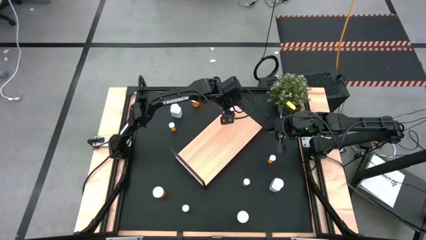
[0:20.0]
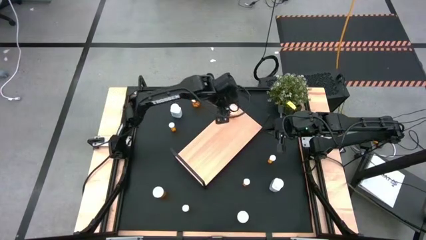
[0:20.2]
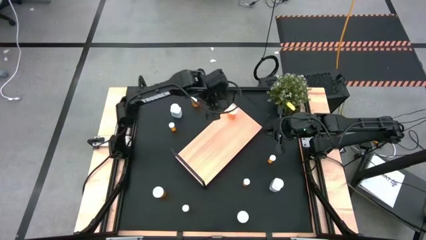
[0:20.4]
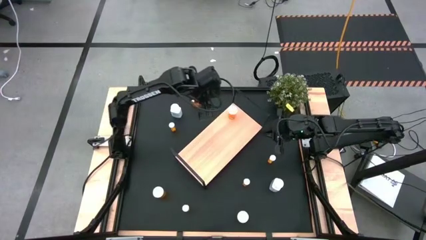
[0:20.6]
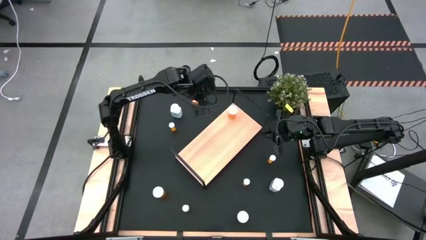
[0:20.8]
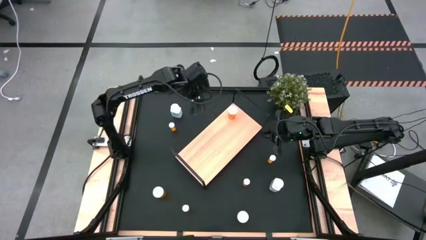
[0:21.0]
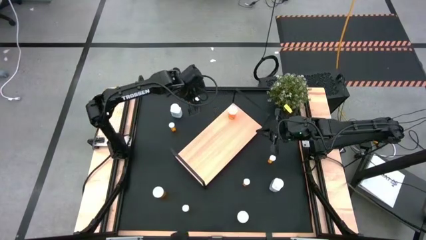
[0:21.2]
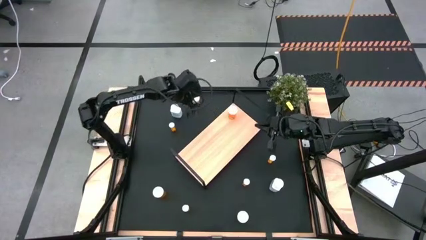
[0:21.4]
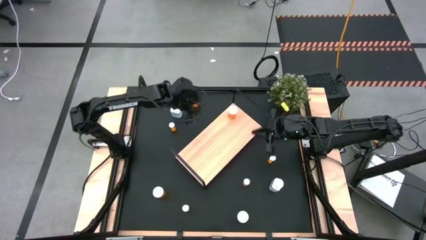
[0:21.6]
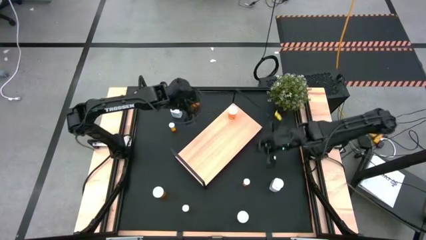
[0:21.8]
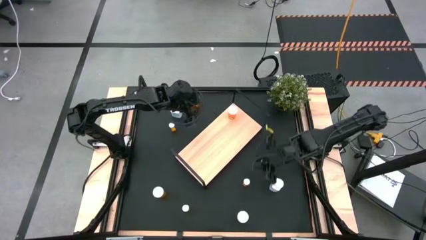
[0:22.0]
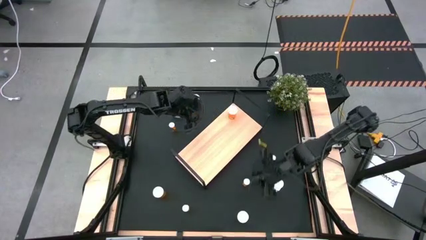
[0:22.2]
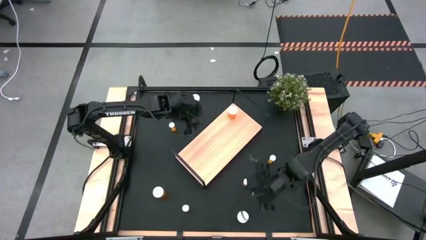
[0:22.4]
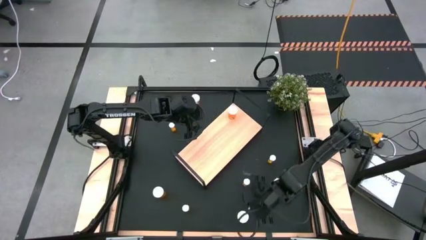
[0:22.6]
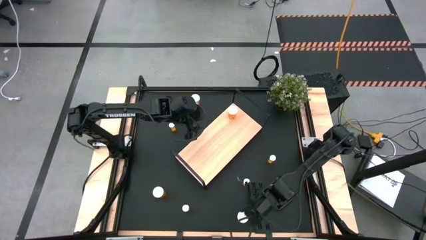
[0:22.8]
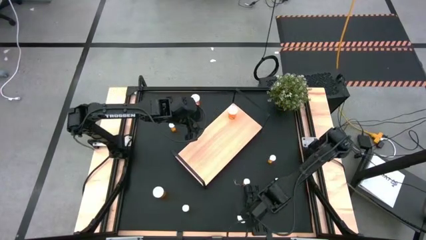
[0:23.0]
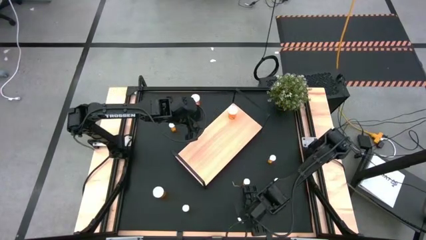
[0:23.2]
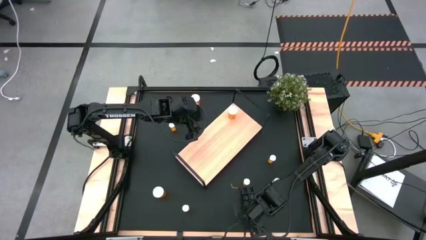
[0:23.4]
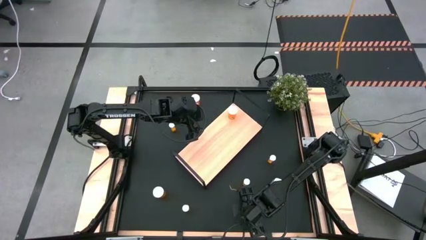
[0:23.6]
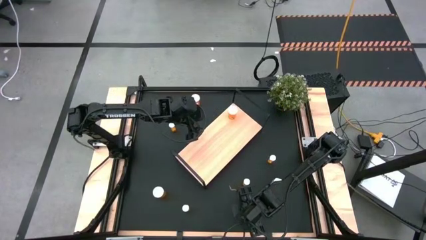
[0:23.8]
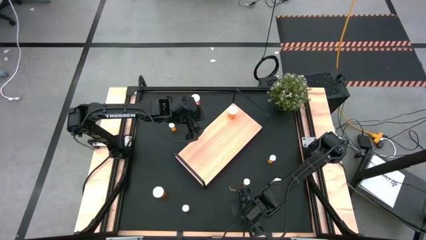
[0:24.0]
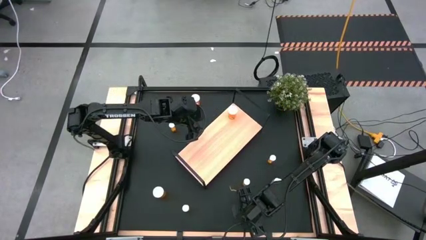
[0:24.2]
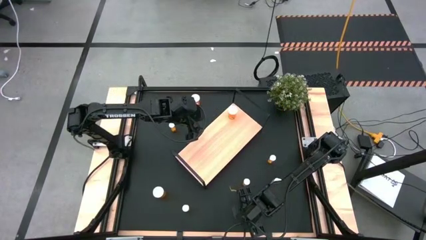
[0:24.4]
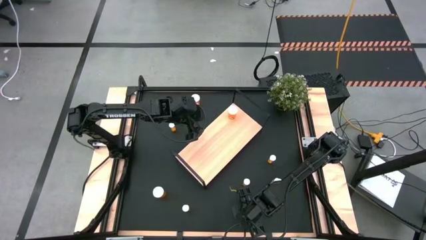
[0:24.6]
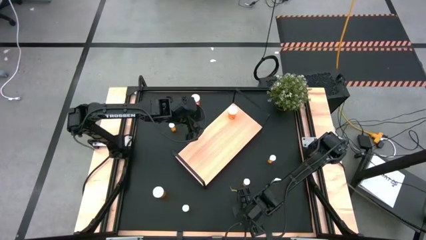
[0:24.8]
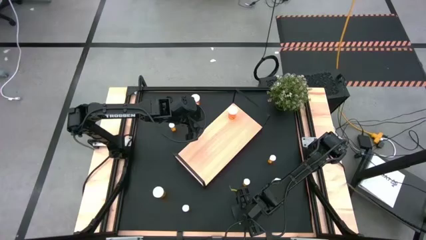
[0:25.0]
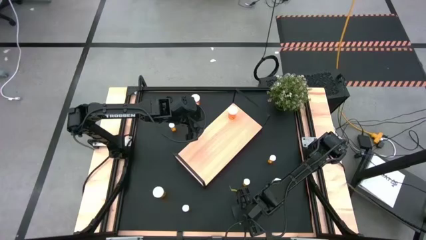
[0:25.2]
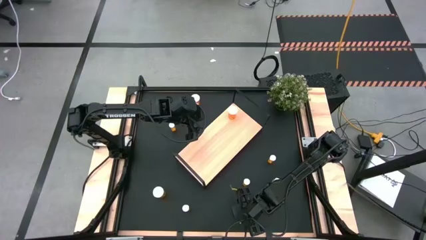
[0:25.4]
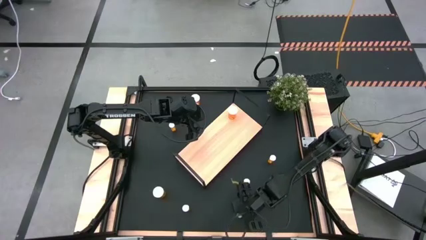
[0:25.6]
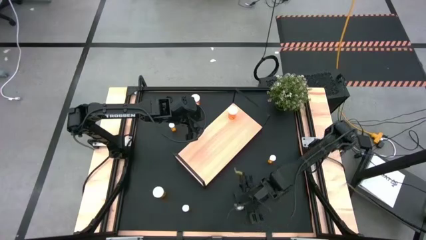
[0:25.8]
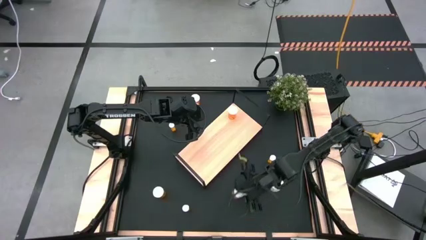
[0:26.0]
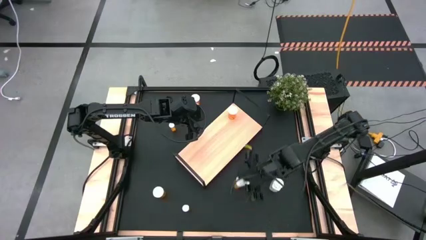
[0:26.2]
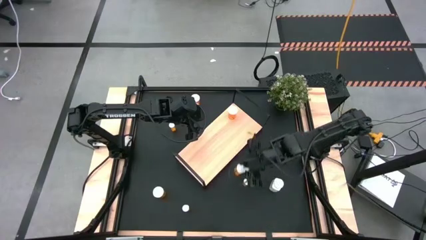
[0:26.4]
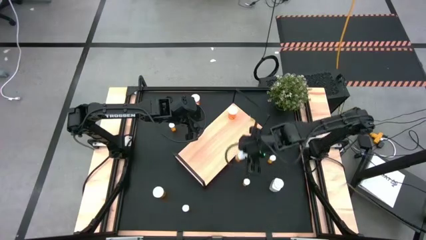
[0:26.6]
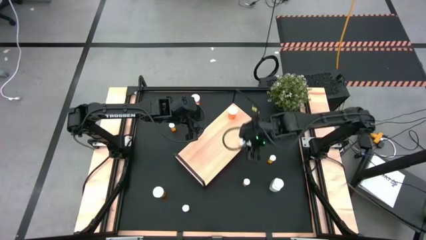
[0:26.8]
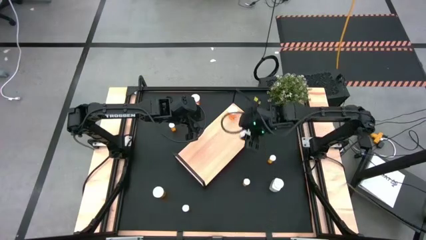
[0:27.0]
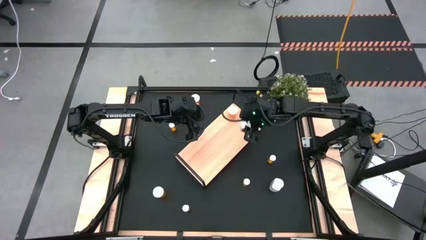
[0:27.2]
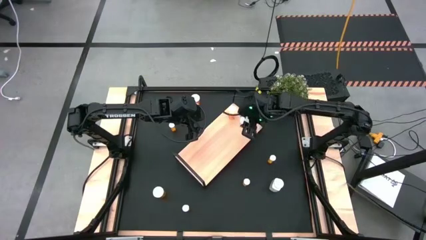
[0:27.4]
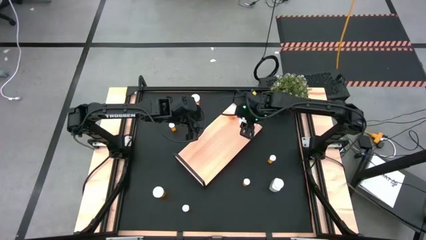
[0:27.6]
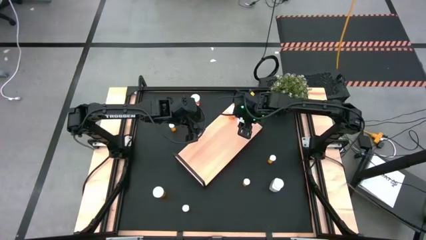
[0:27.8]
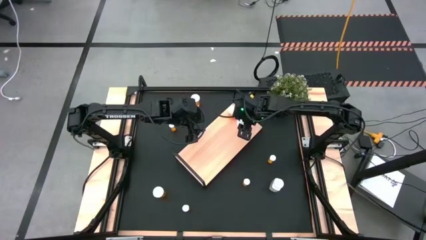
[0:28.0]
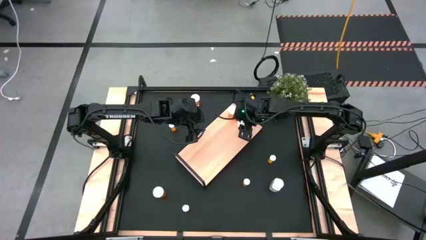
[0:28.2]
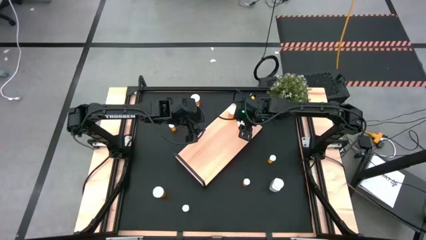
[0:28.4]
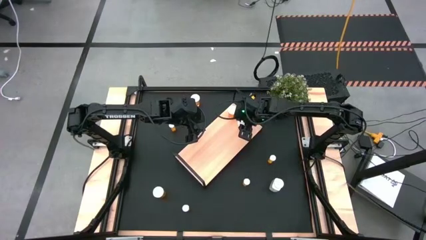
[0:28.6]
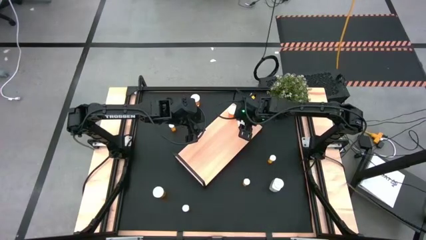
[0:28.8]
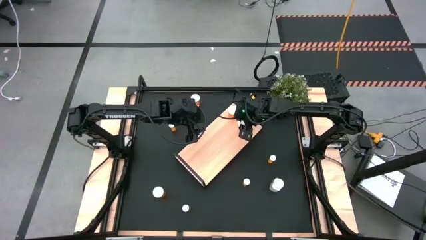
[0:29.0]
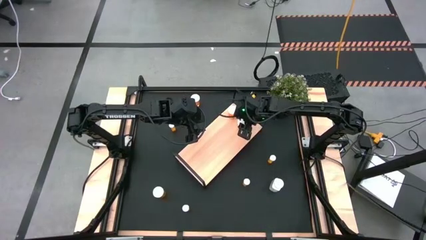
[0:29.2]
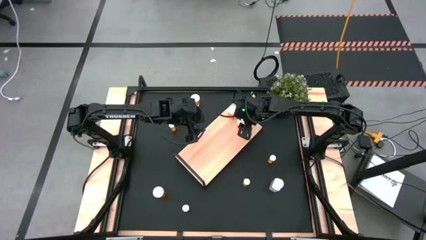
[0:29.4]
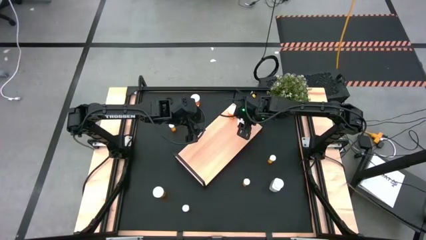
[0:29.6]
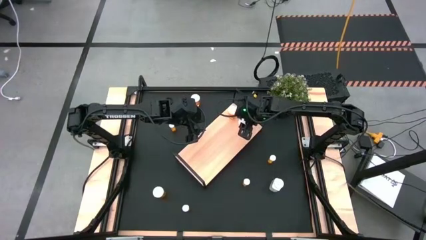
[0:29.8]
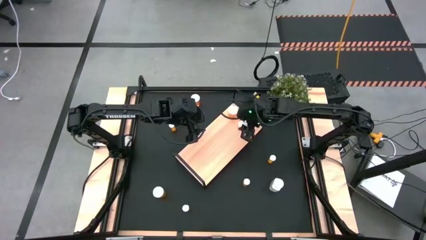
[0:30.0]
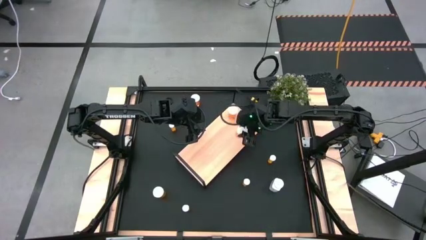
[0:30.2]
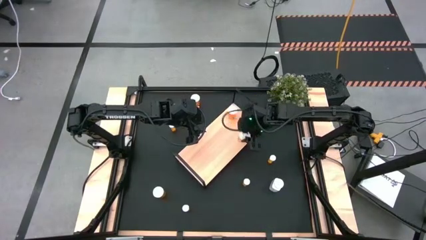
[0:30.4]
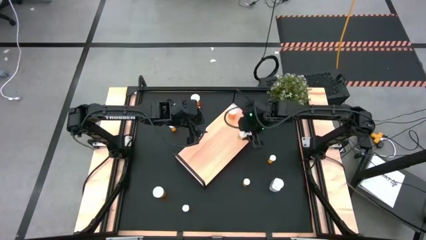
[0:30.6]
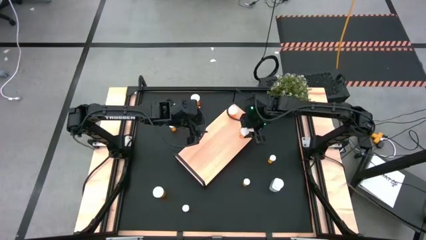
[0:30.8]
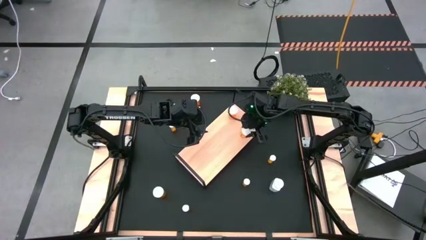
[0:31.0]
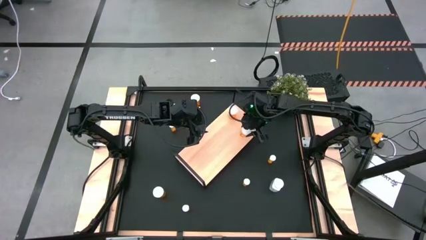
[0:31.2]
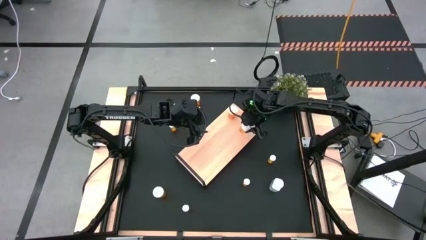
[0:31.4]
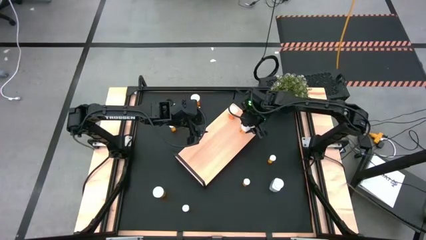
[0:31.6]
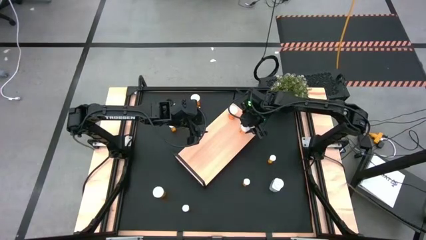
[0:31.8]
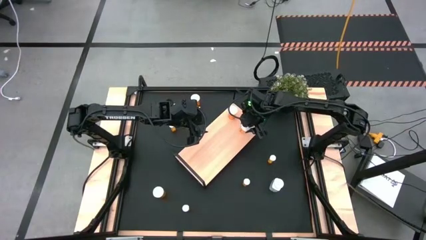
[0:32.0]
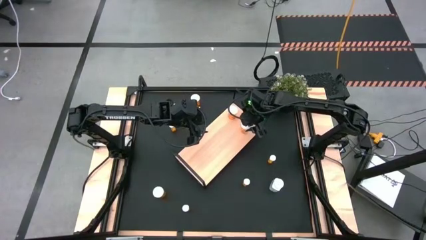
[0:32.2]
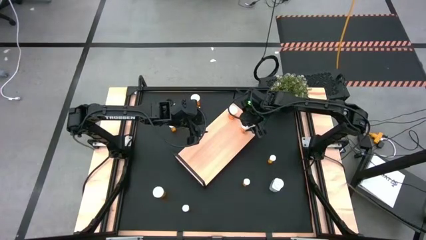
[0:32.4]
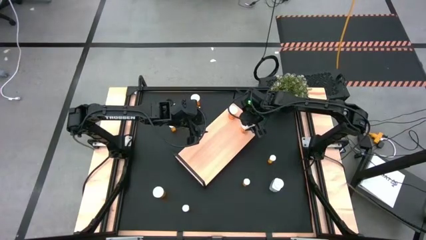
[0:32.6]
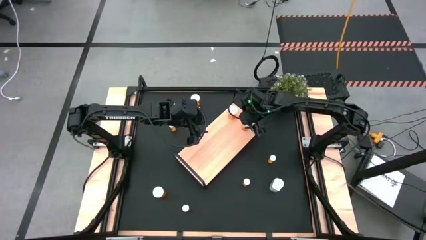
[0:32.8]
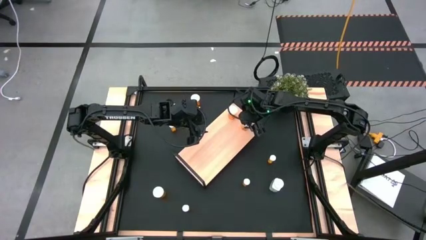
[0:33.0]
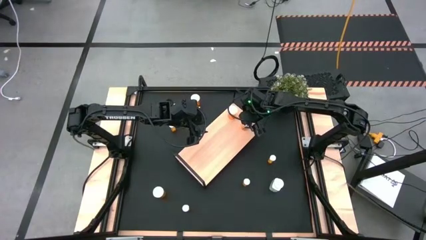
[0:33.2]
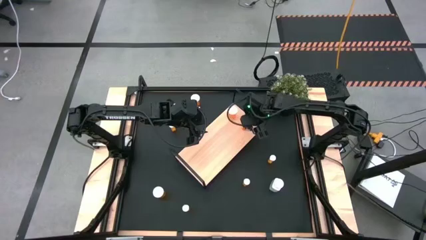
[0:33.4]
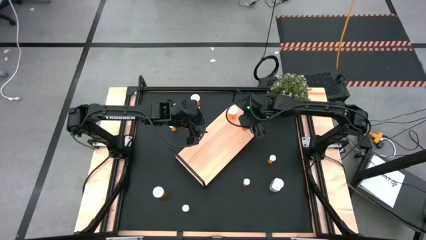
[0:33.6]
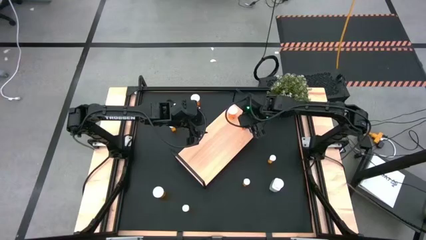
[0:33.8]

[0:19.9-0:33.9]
Task: Pick and place medicine bottles onto shelf by color
Align the large orange pill bottle with the other large pill bottle on the shelf

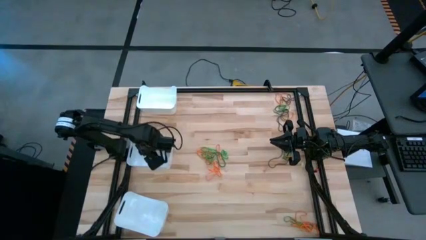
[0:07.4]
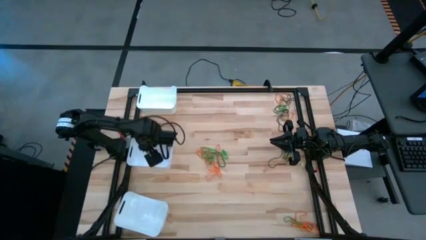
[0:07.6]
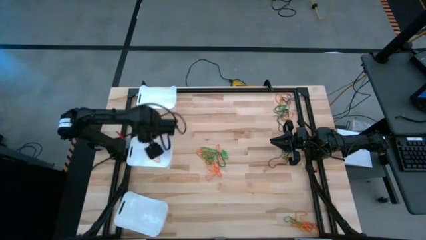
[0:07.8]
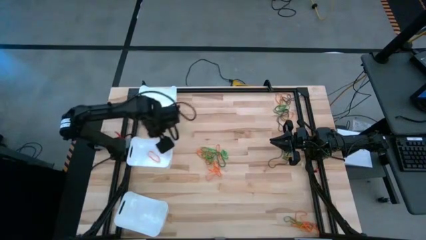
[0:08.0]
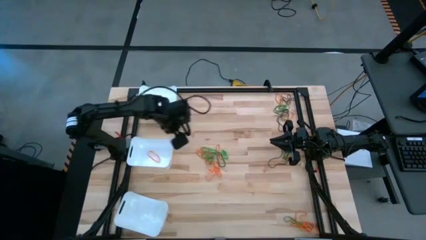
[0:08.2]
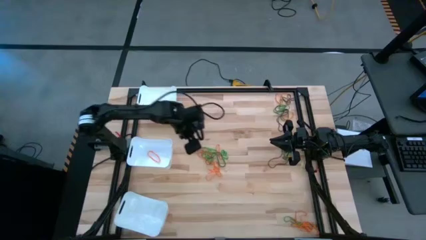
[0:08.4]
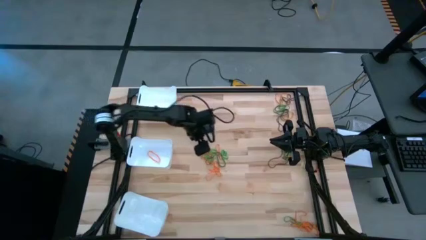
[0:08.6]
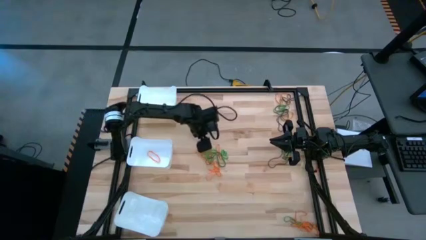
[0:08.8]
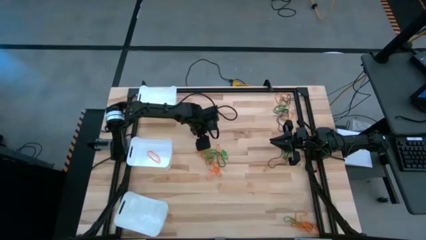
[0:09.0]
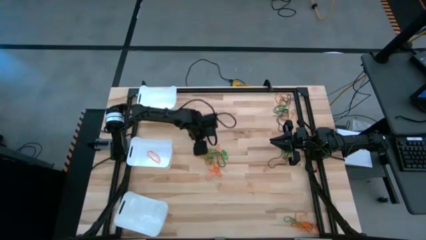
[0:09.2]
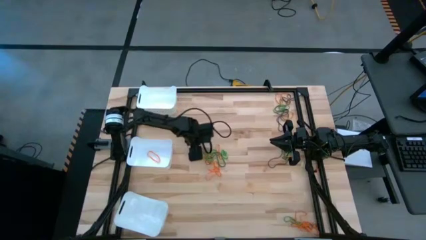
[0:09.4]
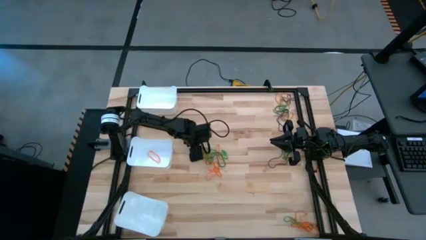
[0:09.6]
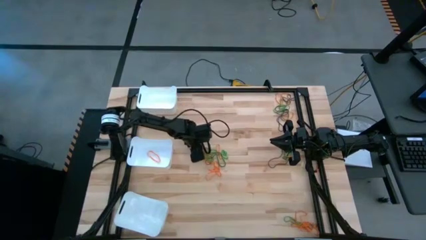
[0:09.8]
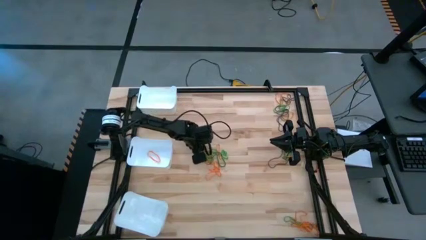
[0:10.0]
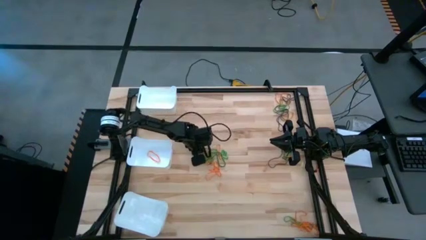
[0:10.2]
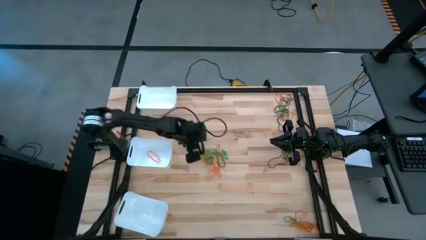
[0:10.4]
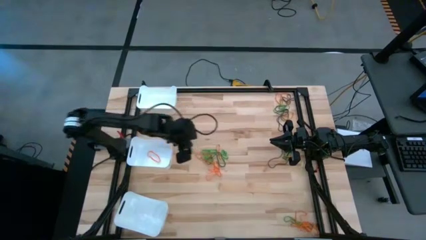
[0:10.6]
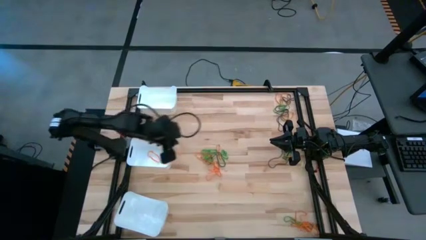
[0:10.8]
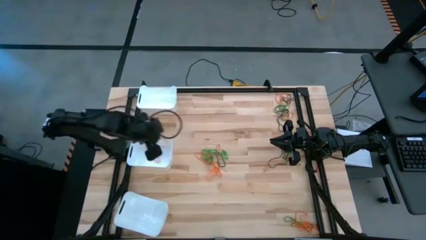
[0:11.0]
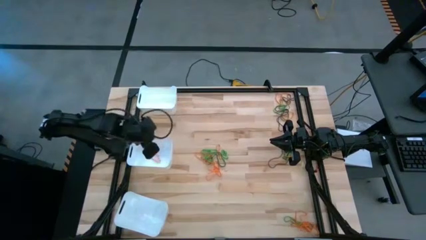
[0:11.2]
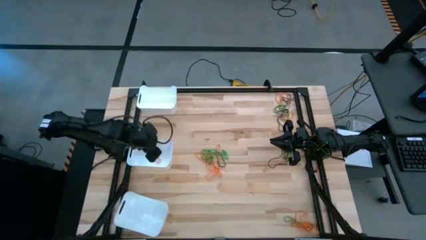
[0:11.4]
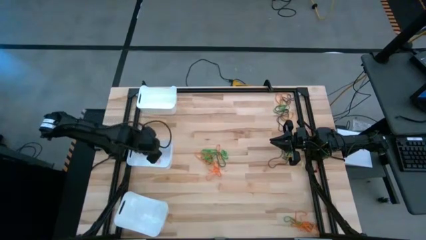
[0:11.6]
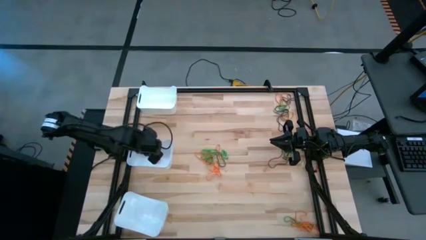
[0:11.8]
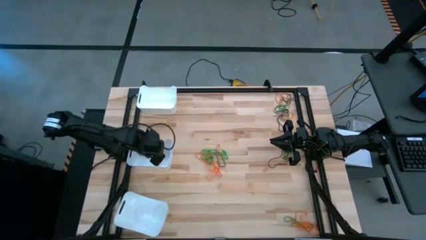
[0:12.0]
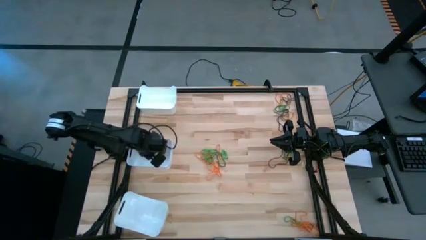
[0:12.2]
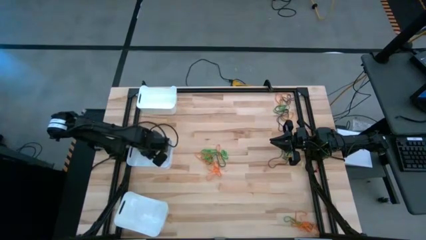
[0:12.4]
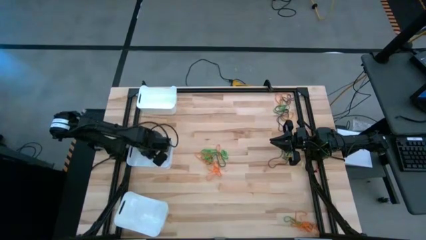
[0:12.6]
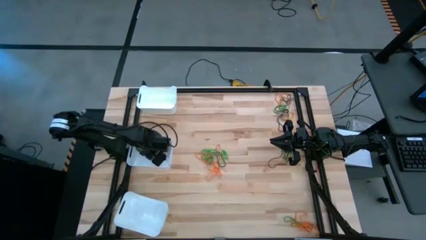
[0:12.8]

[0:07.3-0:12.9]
Task: Sort rubber bands into baskets
Put the orange rubber band into the middle white bin
